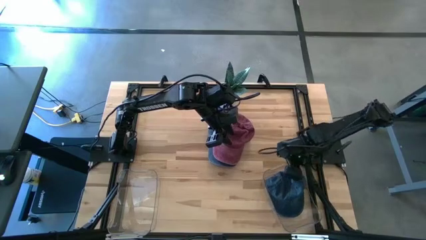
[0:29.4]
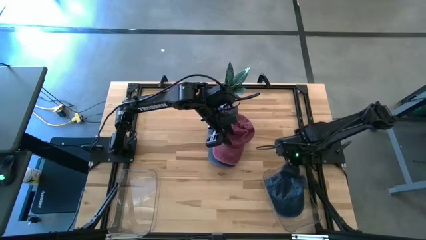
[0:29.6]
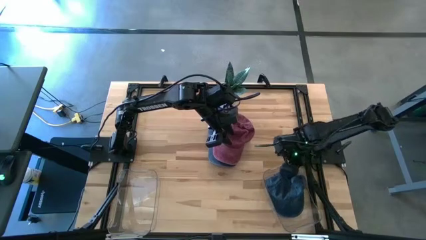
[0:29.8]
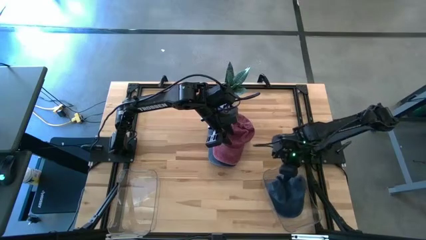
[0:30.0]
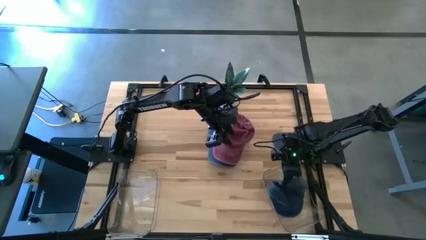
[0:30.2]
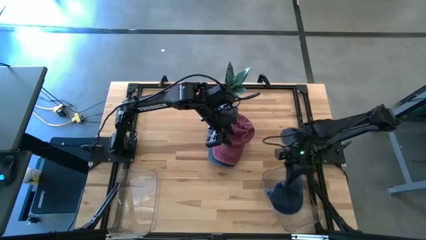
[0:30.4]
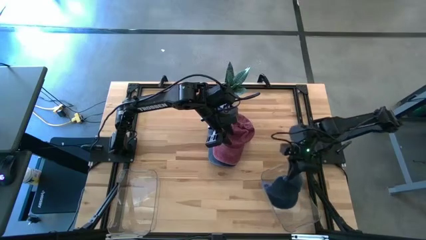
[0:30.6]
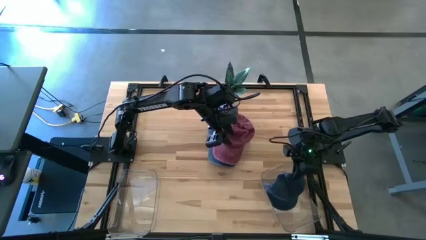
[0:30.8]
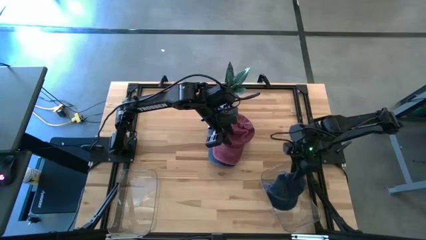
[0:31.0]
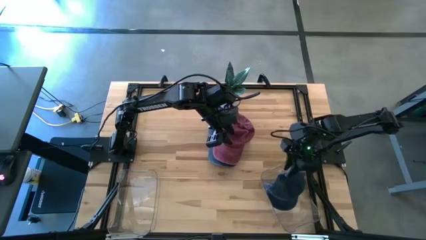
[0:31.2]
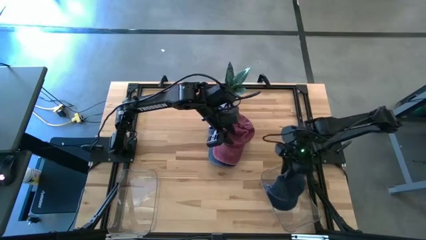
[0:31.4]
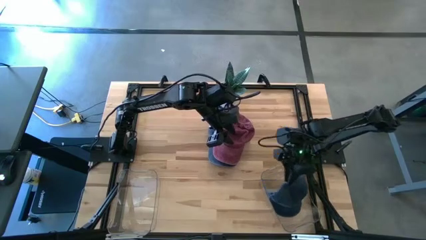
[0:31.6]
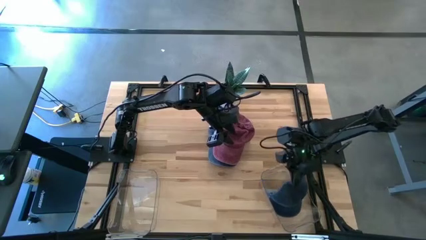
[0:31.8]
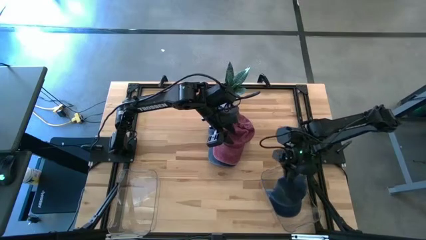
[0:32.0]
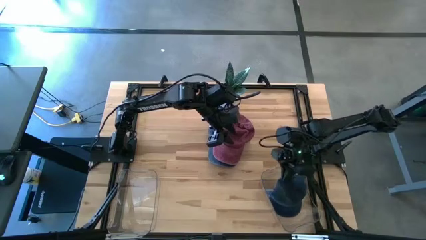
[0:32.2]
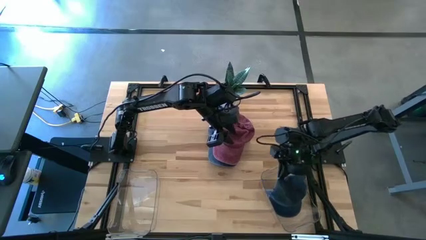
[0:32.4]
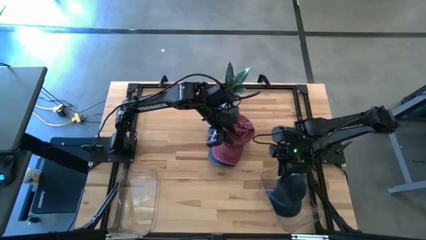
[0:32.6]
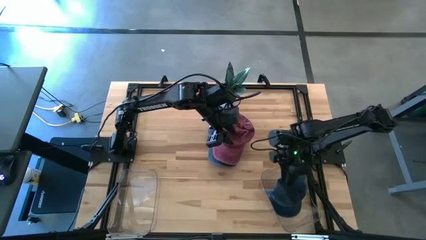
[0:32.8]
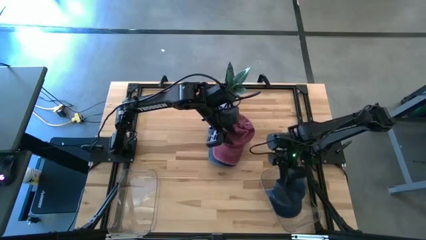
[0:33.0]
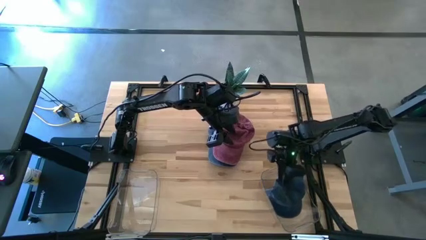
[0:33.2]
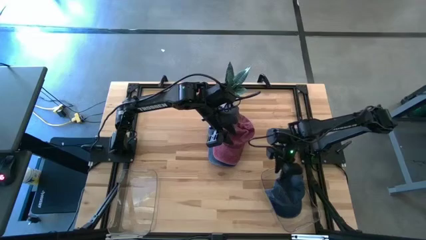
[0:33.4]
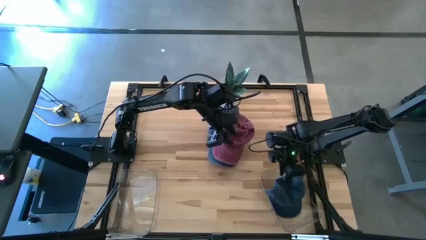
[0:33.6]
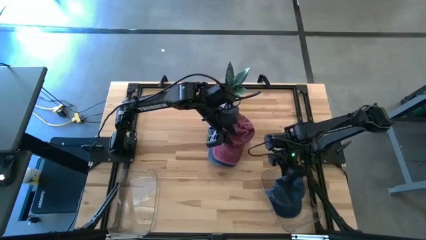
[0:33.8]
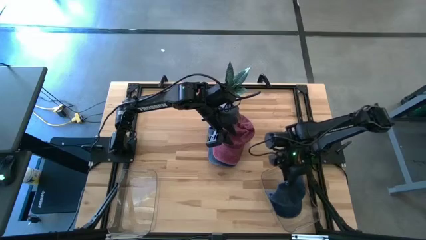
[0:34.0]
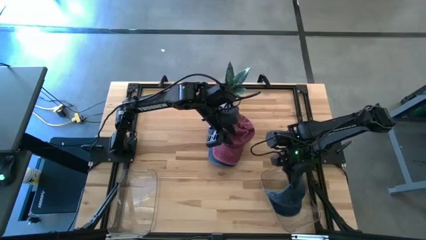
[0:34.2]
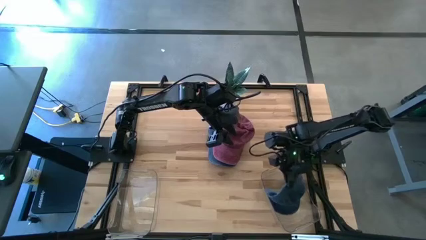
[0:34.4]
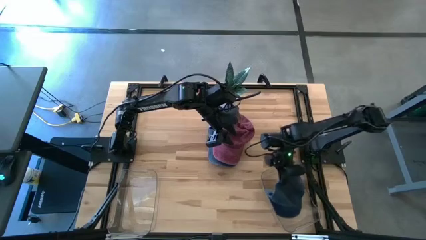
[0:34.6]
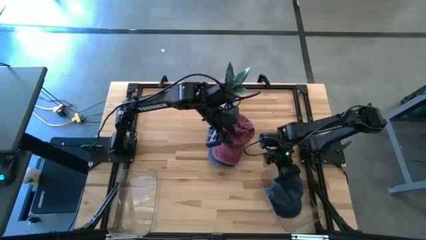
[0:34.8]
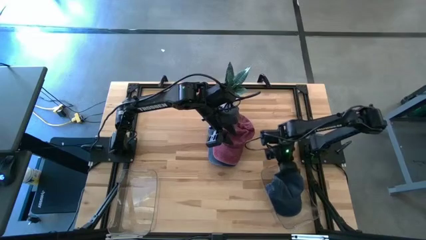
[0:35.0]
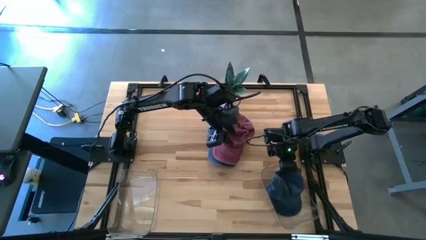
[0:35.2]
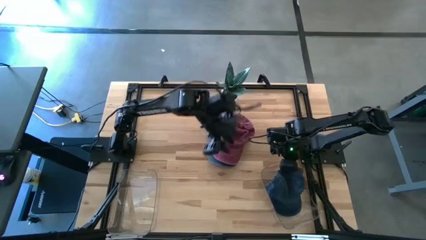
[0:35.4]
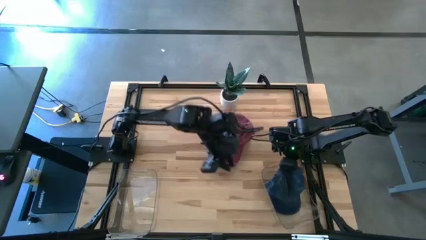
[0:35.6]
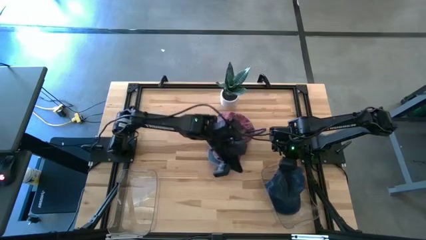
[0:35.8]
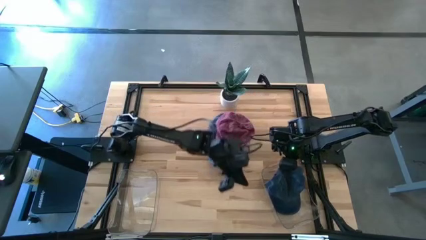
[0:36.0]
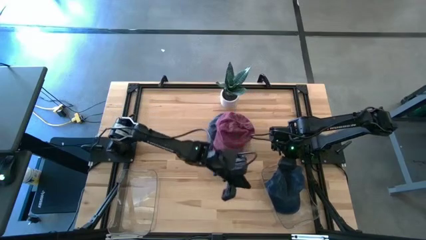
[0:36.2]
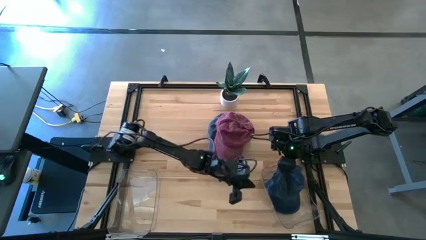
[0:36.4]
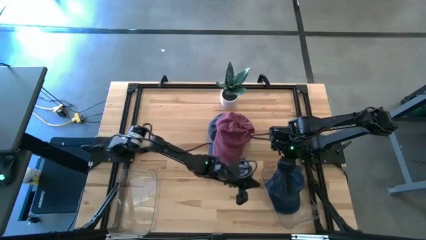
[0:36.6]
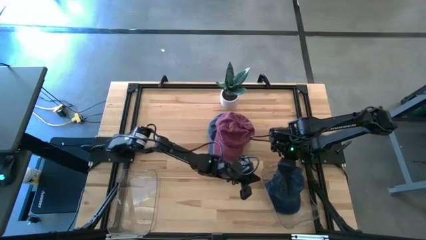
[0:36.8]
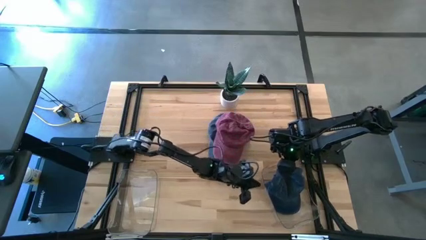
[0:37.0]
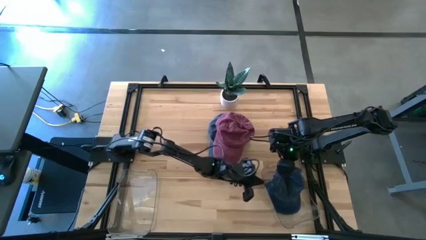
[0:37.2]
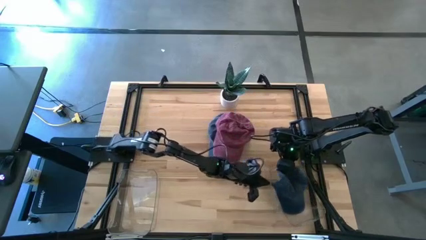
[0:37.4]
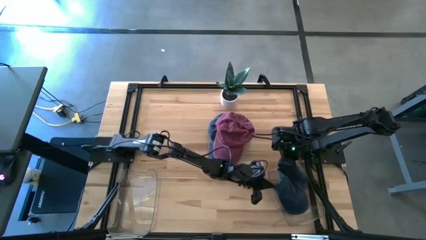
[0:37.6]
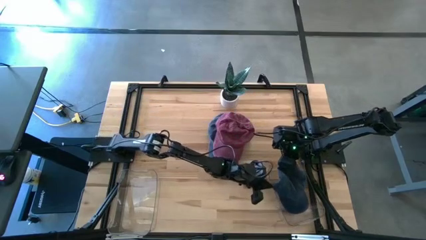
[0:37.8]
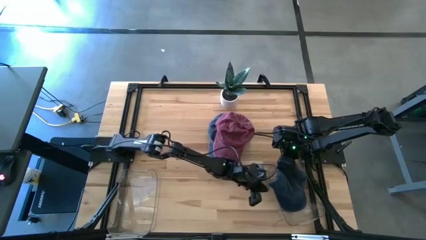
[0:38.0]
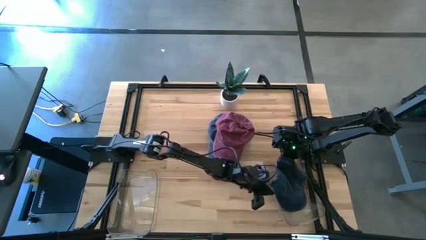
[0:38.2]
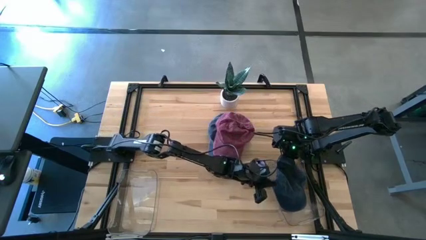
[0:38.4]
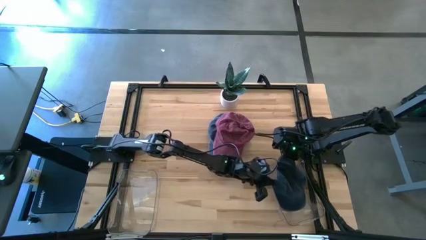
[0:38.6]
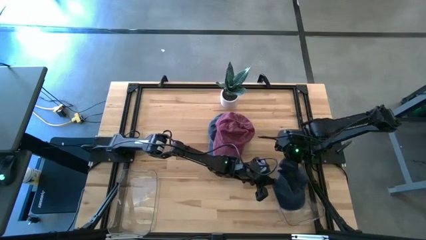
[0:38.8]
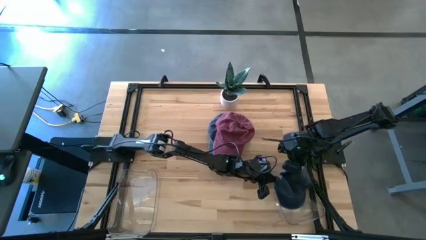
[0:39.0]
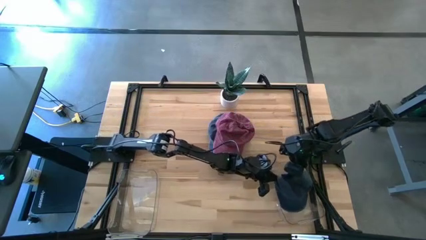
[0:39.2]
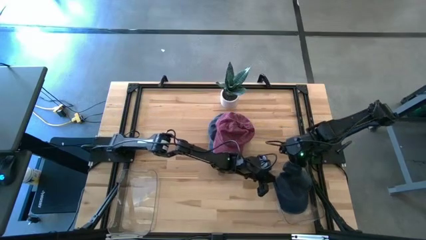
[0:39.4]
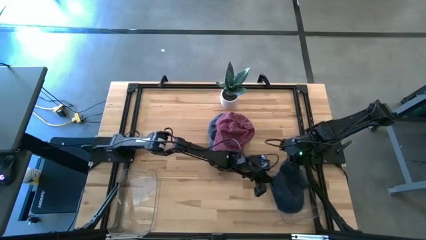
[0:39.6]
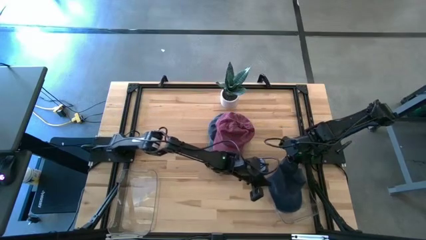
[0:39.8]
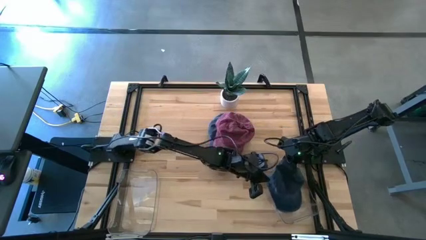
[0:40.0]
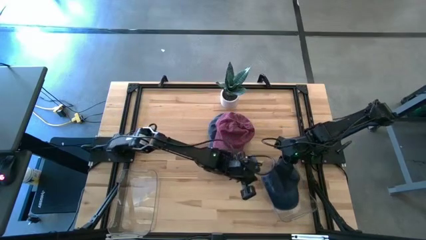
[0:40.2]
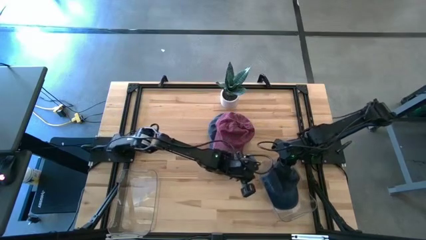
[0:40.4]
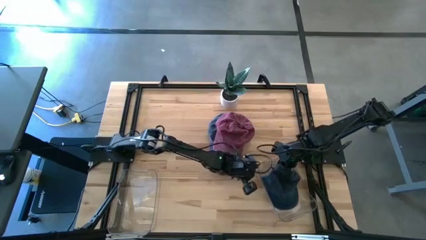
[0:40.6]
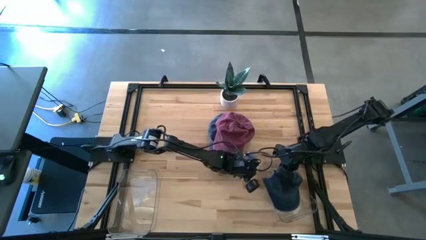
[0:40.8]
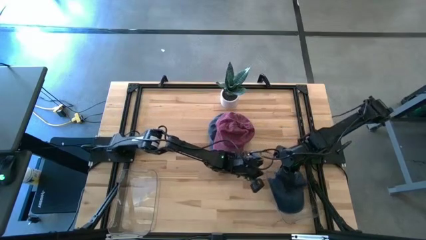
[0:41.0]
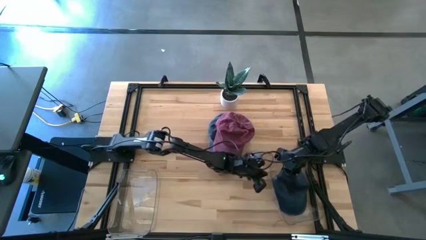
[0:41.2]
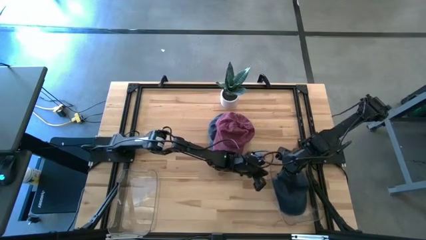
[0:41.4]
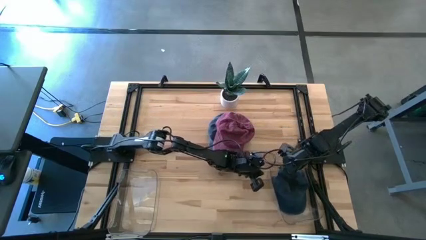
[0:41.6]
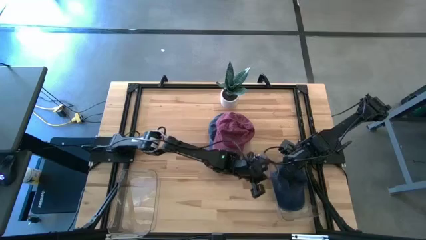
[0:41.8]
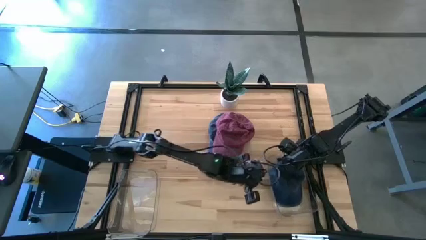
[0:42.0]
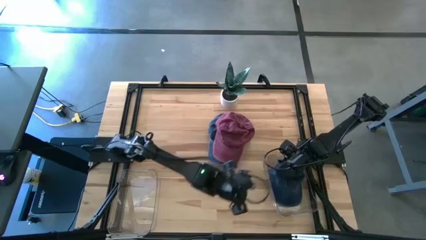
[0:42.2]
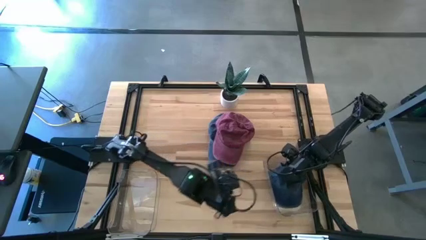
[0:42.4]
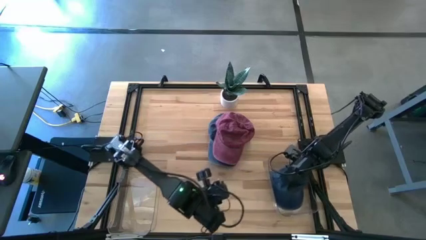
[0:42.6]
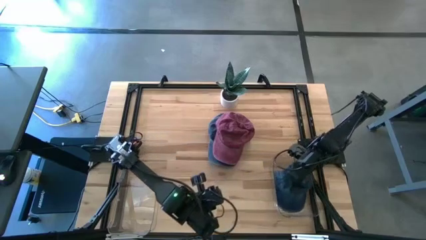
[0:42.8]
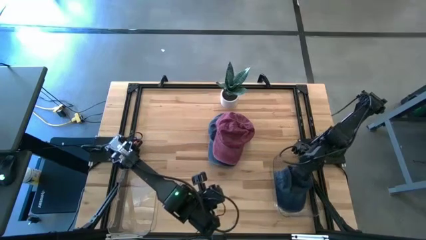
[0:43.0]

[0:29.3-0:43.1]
Task: Pick & Place hat
Put the blue cap into the right transparent bin
